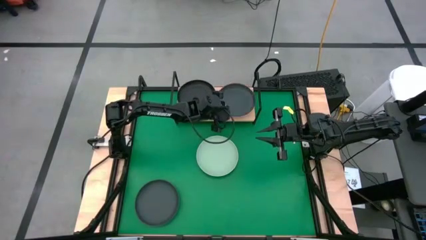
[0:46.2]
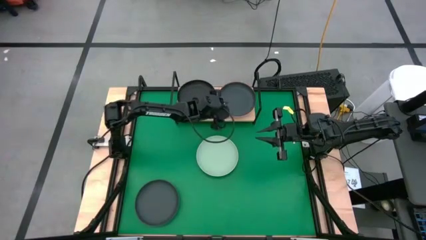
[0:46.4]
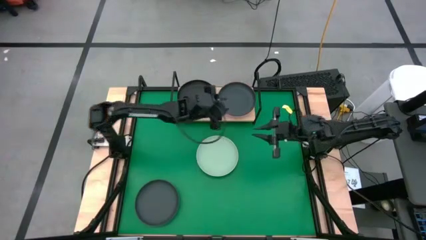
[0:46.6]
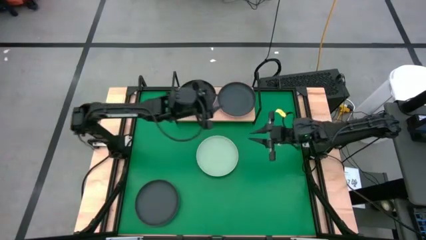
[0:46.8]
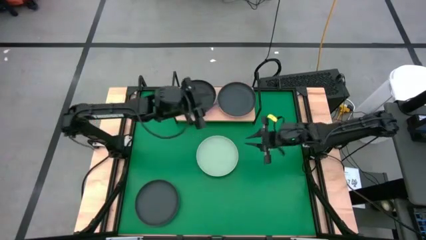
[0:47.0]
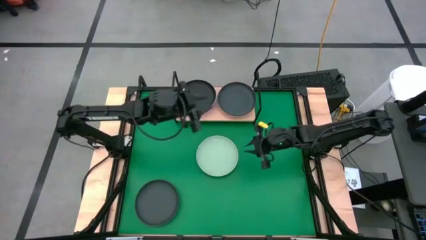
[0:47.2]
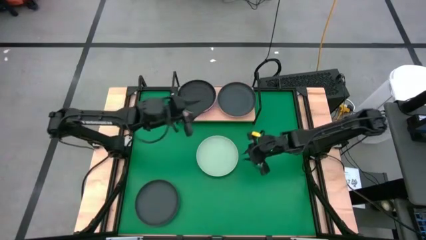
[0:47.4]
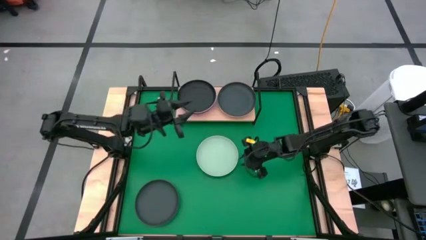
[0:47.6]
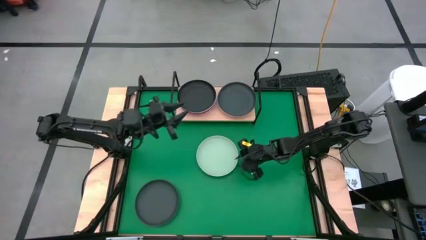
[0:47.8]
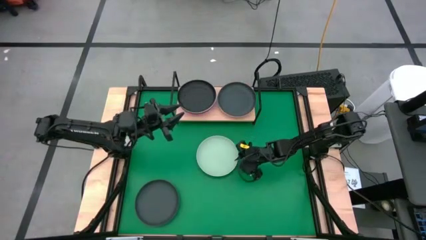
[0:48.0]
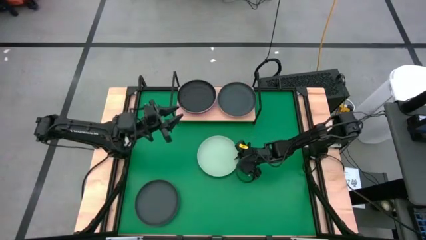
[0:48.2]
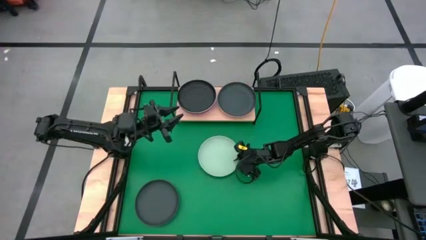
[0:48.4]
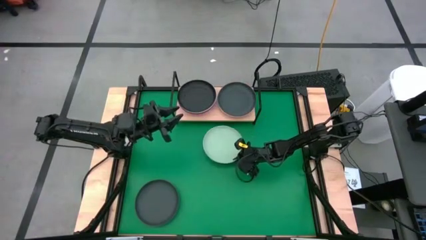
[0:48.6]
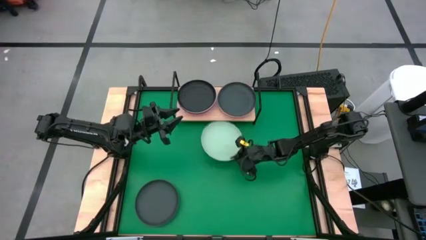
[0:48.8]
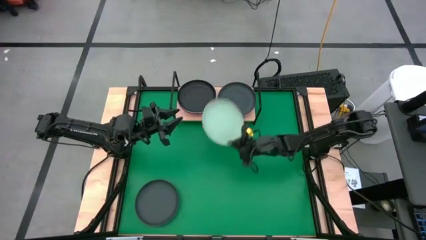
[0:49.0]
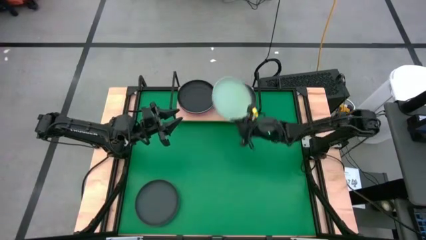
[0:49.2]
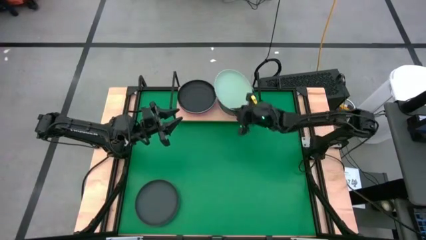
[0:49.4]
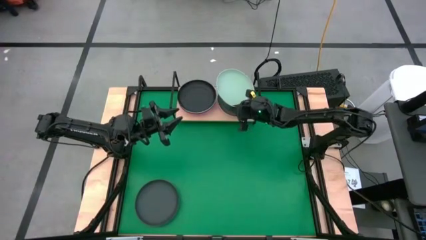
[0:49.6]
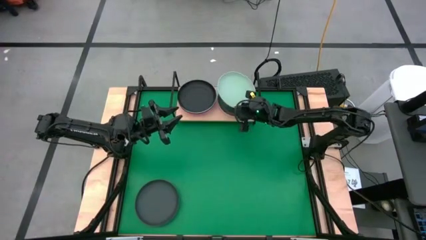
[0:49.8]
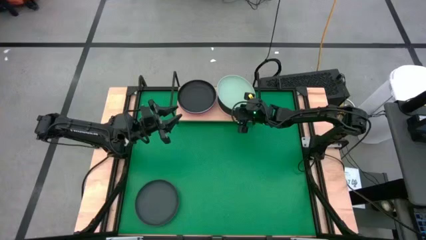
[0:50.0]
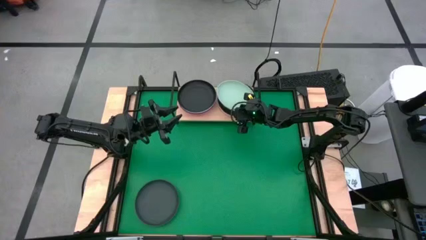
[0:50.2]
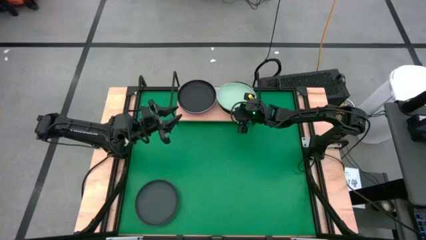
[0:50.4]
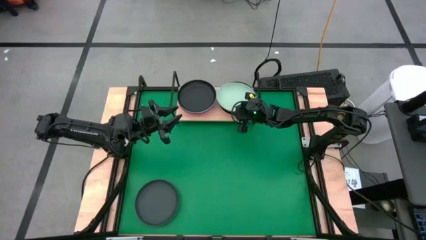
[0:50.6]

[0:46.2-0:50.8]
Task: Place and stack plates onto a shelf
Stack the light green plate on top of the black plate on the shelf

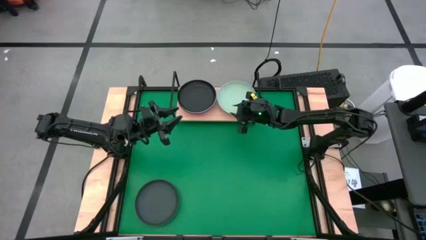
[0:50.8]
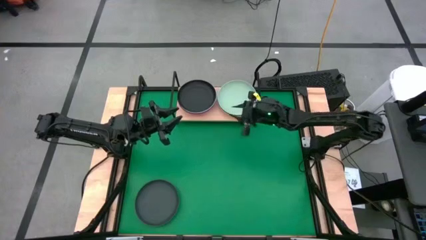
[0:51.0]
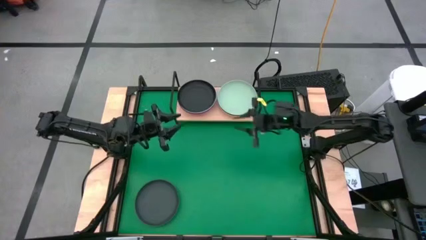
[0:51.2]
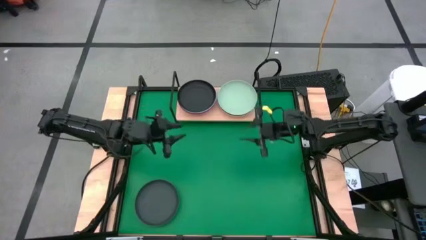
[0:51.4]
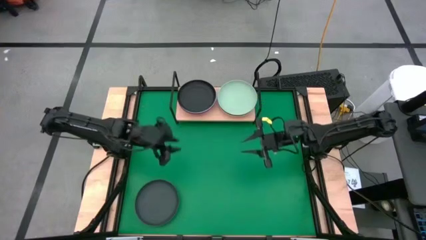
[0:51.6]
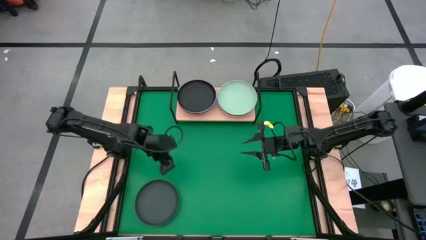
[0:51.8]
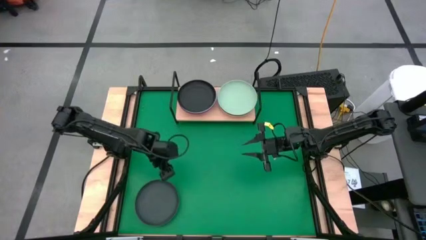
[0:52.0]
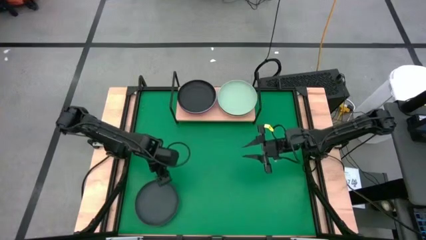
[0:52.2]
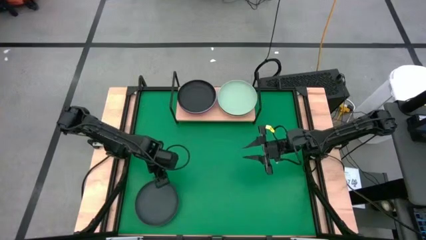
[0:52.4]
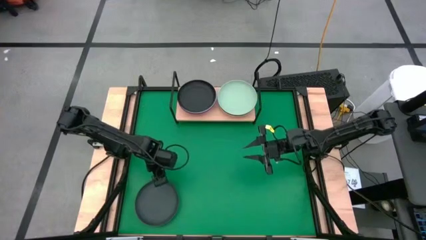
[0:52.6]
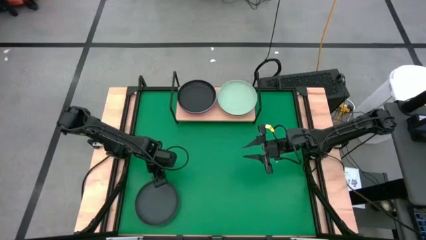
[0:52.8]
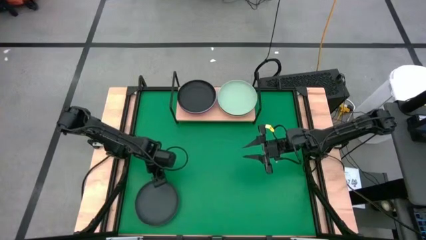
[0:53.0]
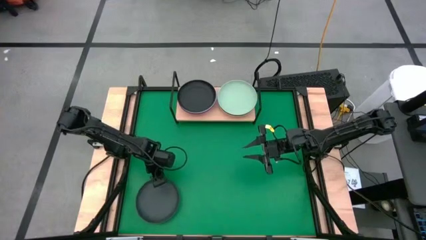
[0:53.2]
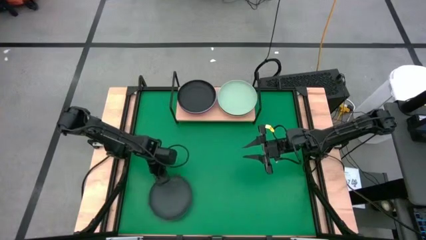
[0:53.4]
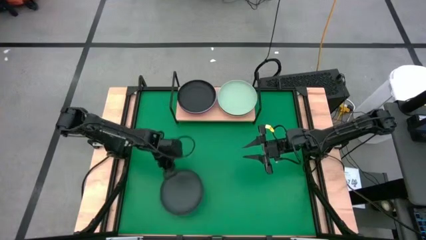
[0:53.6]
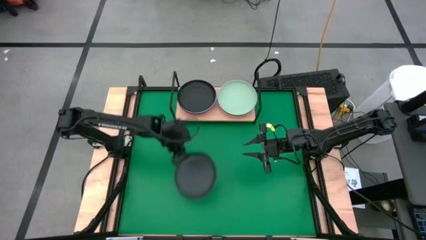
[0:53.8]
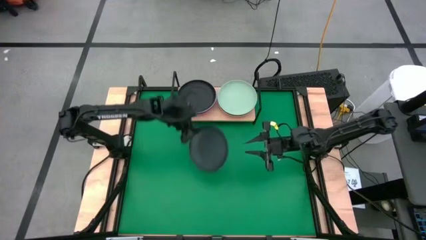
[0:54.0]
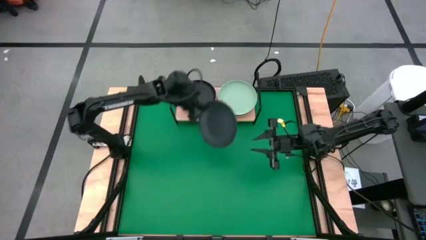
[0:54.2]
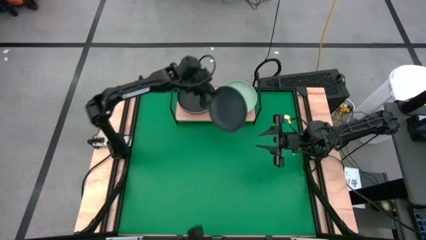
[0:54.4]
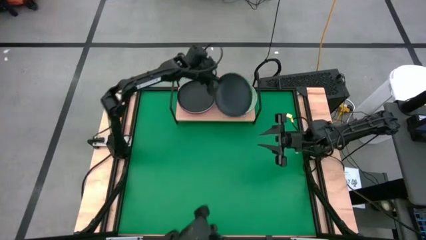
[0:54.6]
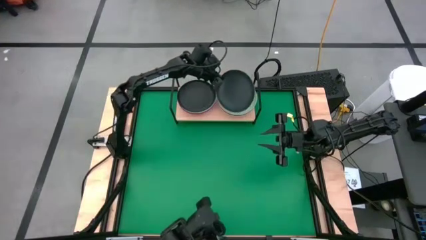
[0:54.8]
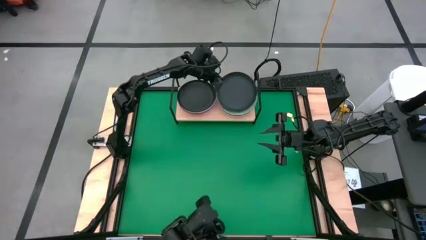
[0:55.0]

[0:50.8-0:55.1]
Stack the black plate on top of the light green plate on the shelf

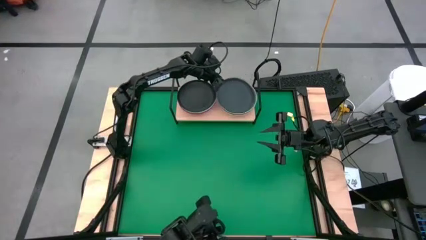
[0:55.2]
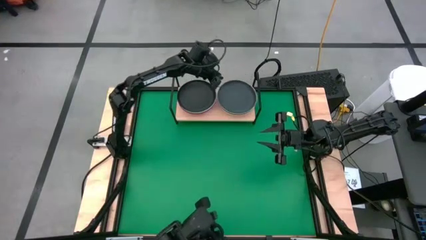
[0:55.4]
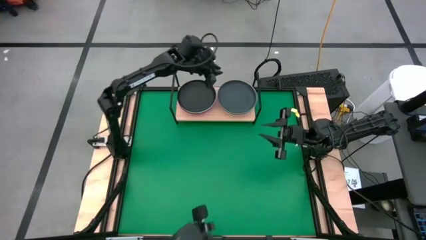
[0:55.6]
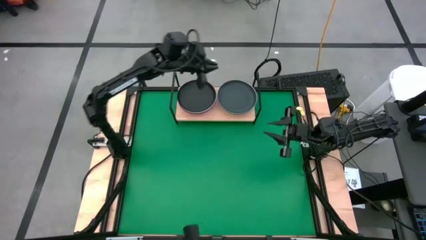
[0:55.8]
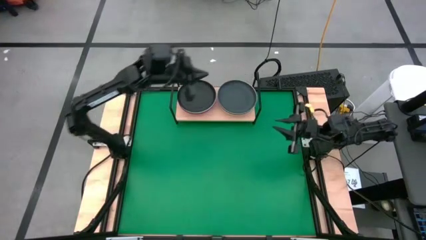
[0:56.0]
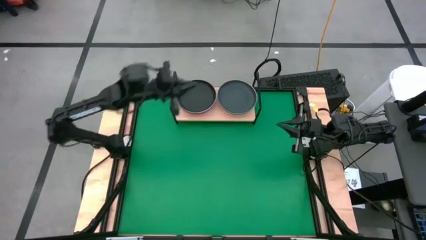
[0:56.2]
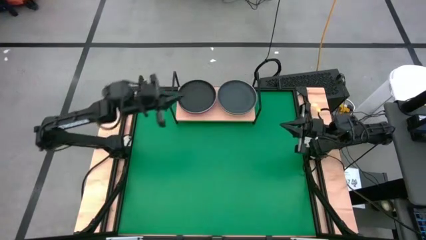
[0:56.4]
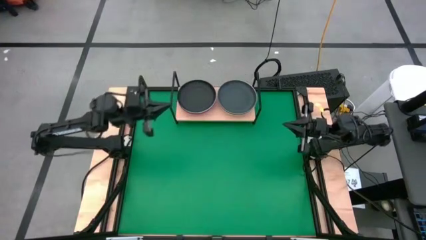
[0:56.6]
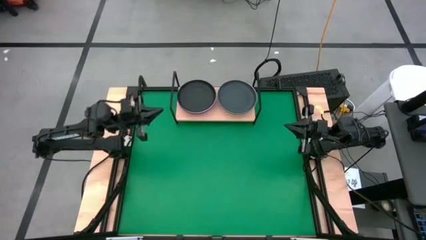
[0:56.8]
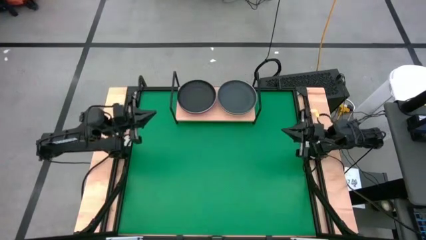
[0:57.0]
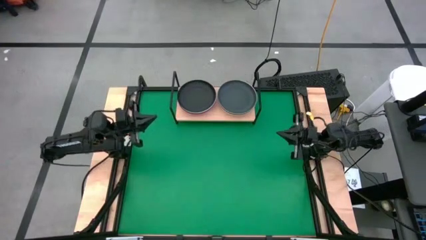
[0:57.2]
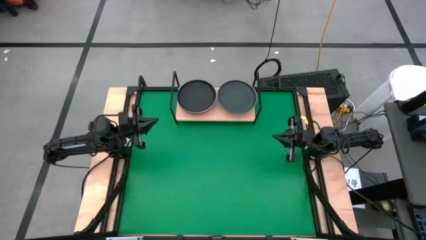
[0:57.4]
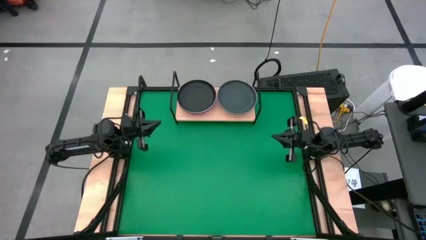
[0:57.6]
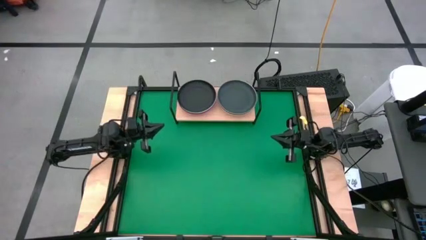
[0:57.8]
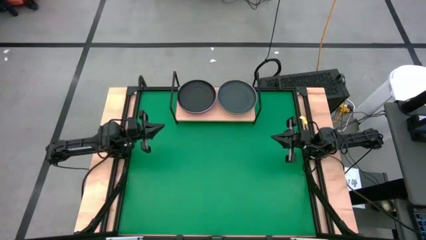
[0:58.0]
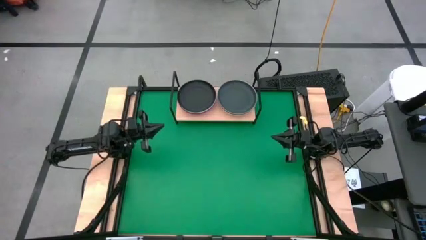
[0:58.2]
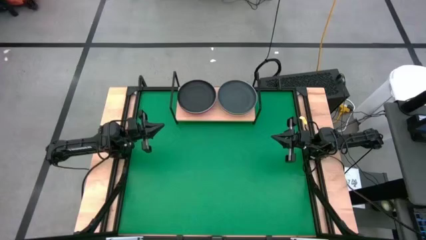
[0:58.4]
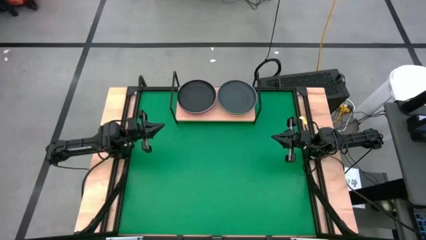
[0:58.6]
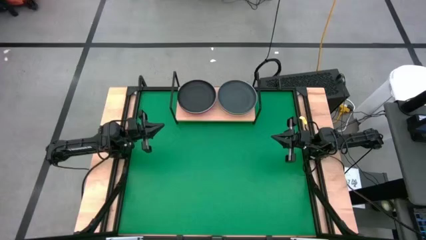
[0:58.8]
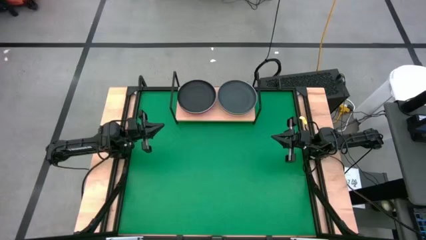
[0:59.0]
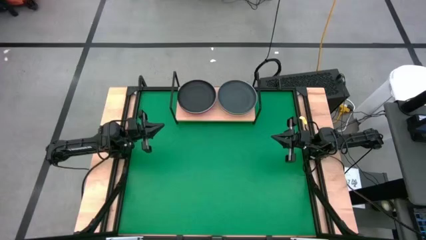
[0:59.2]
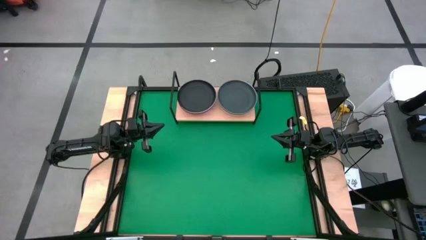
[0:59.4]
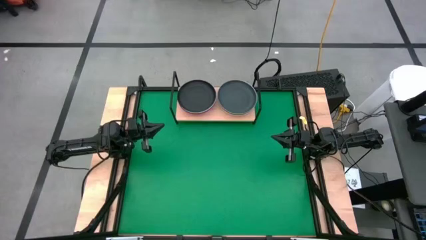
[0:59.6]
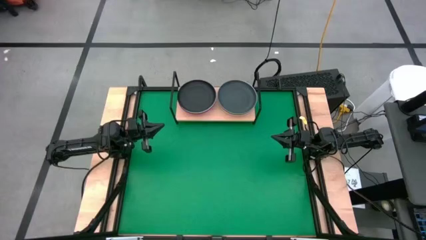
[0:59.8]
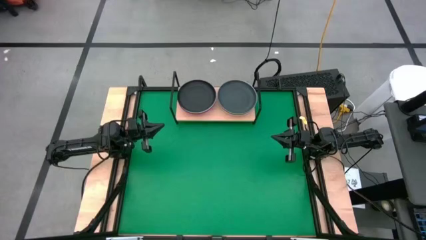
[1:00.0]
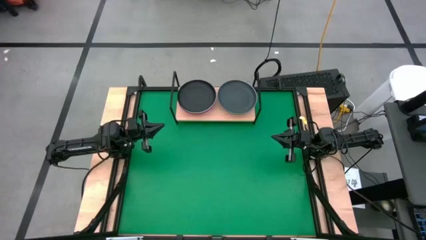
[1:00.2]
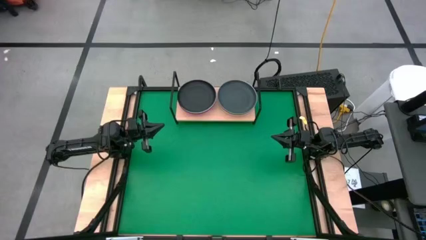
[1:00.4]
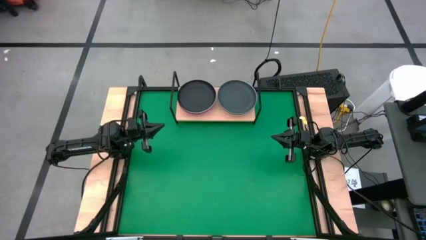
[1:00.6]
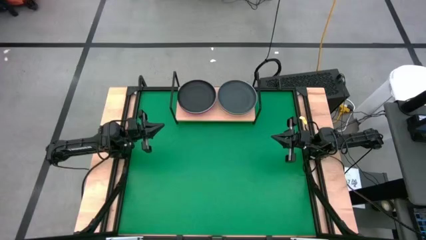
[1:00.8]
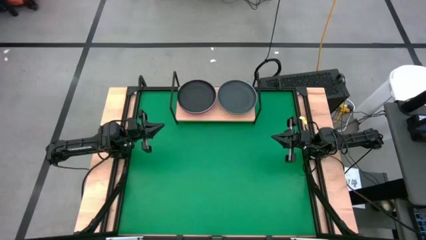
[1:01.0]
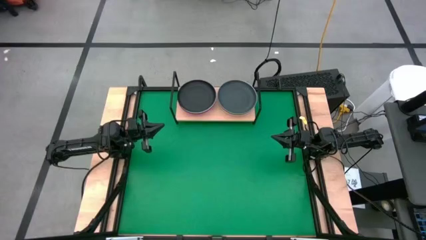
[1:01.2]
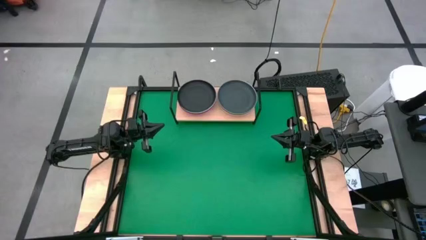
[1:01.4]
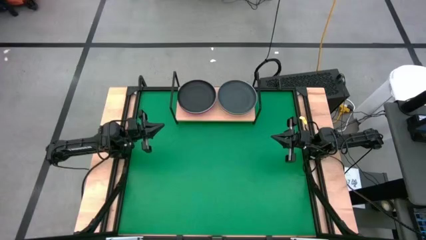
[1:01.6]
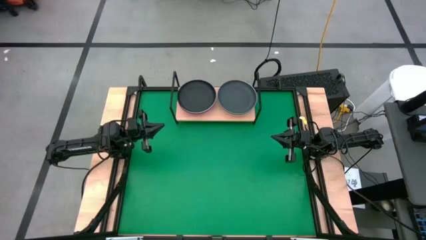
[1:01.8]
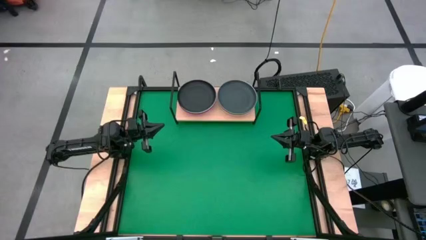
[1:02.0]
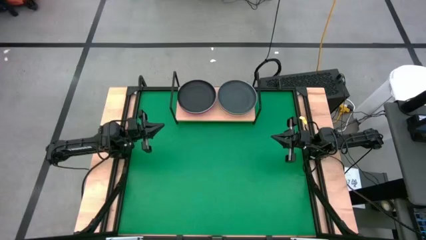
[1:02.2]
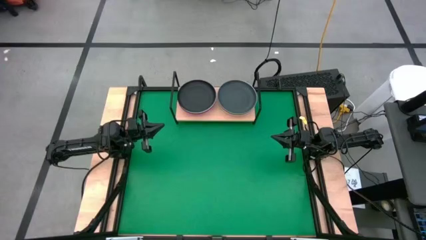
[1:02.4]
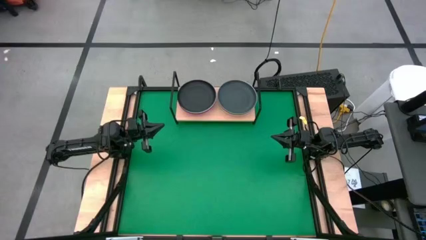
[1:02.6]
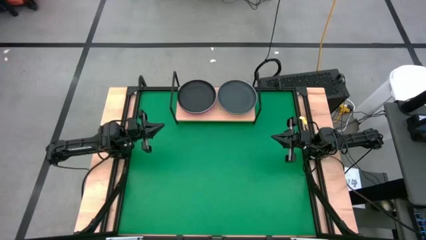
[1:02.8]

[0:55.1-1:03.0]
Return to Home Position
